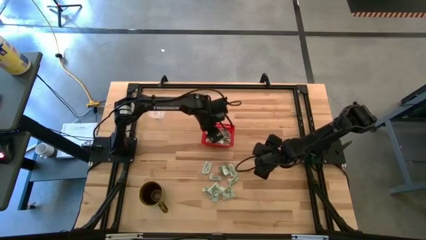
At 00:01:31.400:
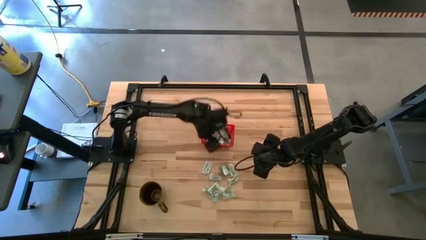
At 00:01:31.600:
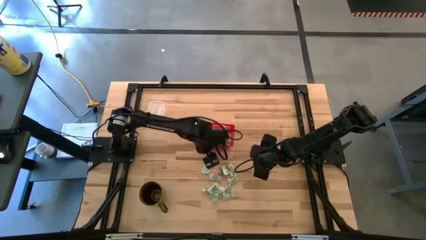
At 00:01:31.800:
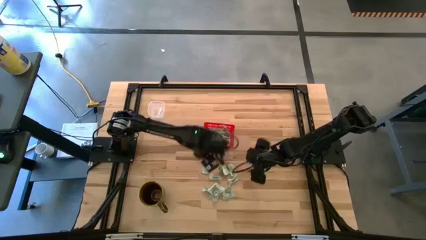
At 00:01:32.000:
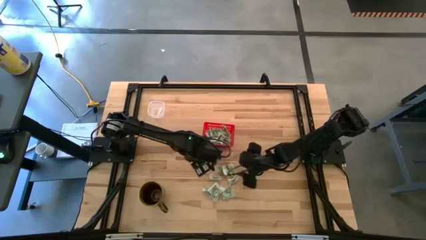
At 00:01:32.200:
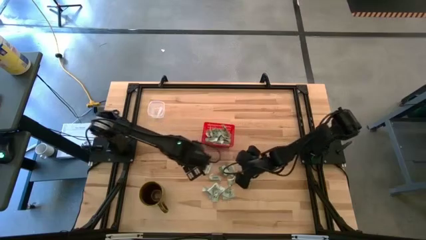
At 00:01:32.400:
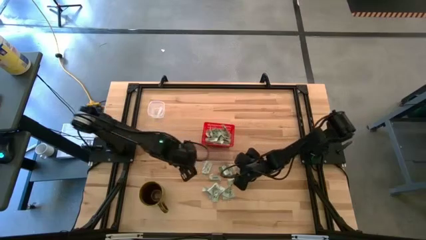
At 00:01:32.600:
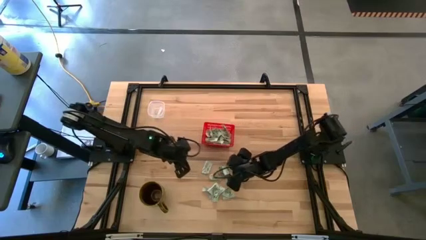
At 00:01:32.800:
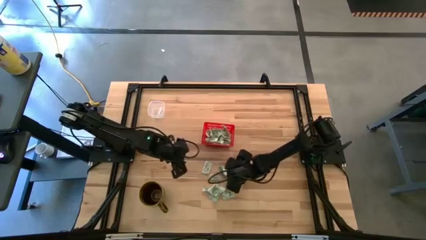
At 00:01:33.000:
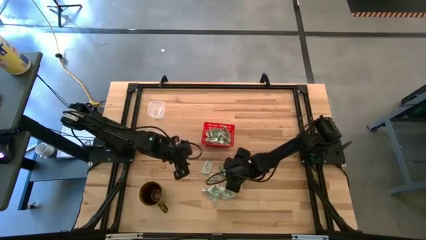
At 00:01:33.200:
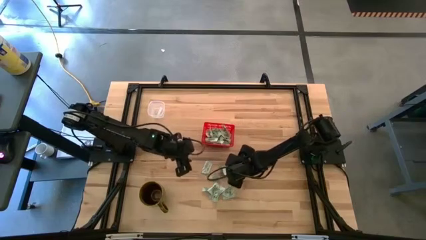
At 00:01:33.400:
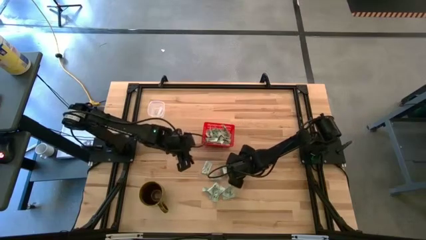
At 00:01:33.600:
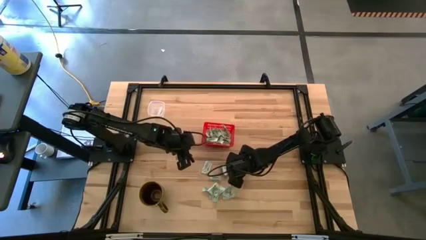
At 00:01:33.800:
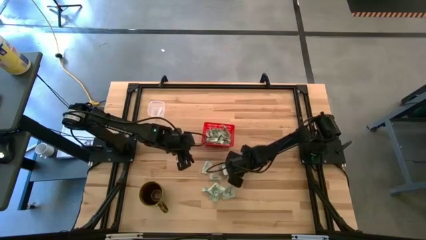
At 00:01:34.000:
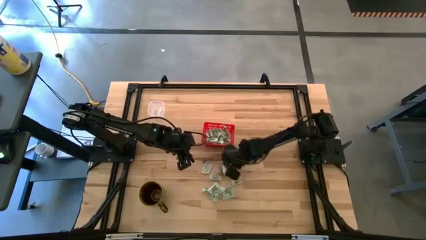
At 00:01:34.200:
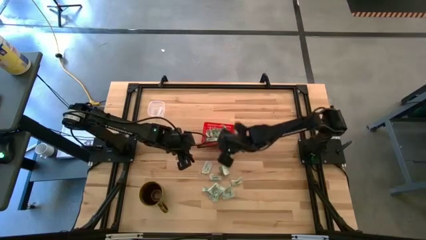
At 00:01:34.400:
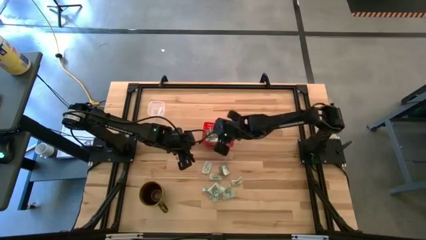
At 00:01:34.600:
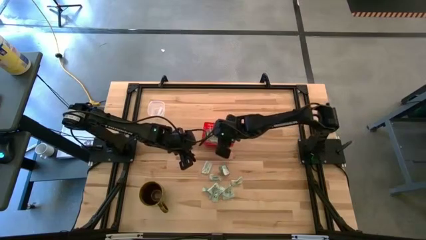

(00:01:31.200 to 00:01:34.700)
Task: Pick and place items into bin
Put the green stevia packet into the red bin

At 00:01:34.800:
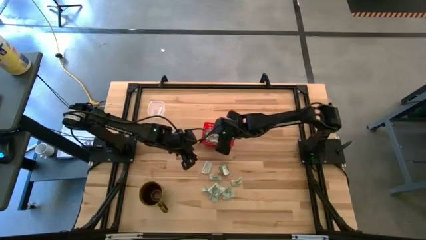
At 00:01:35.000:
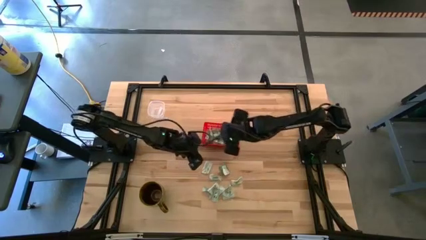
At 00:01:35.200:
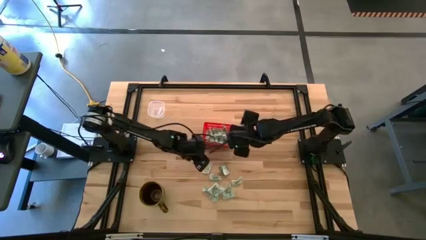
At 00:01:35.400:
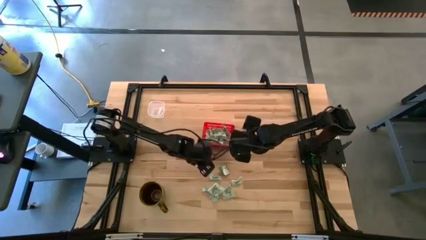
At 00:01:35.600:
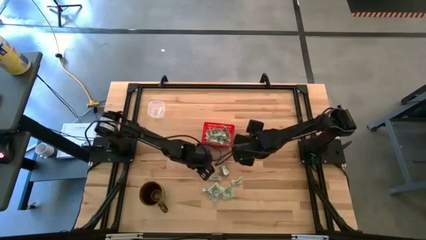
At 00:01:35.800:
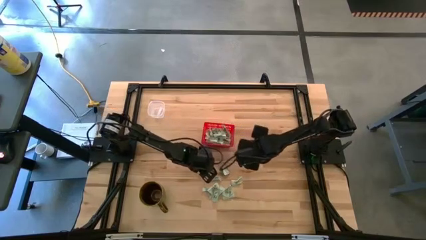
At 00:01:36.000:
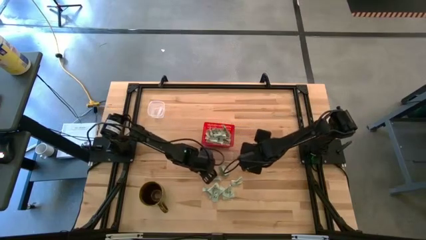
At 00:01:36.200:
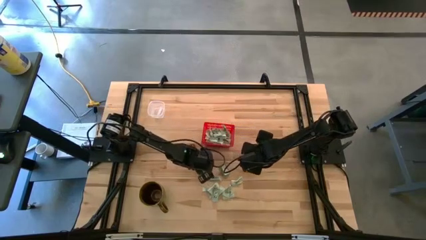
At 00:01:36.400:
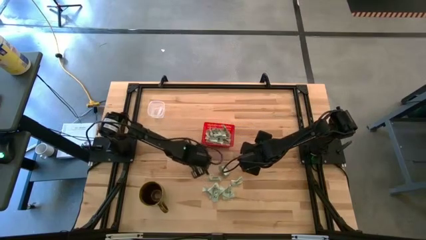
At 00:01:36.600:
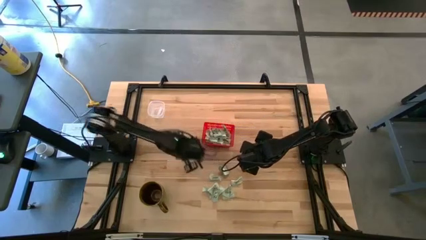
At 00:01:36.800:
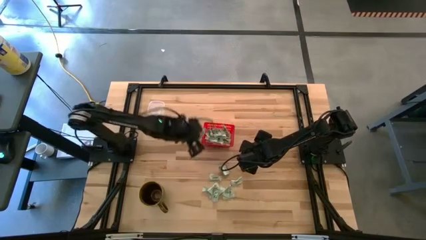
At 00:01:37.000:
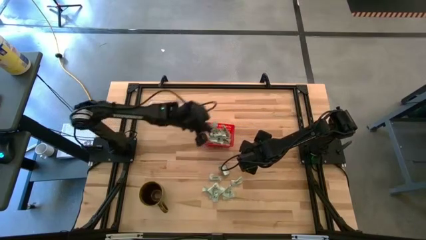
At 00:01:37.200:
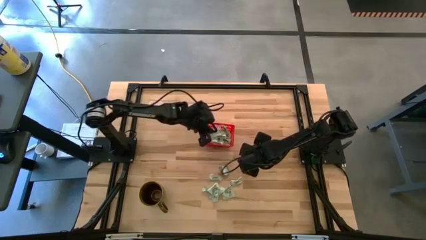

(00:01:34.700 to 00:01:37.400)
Put the green stevia packet into the red bin

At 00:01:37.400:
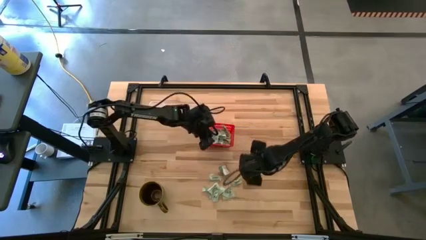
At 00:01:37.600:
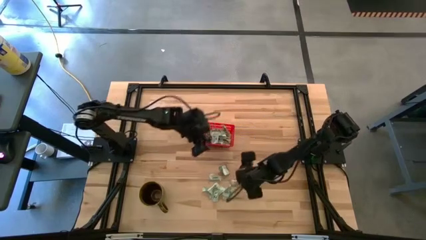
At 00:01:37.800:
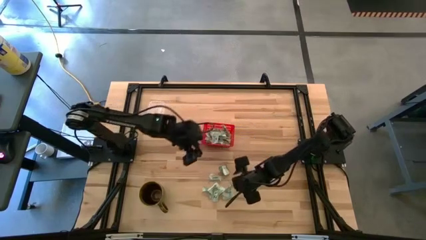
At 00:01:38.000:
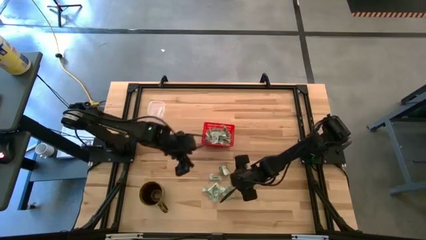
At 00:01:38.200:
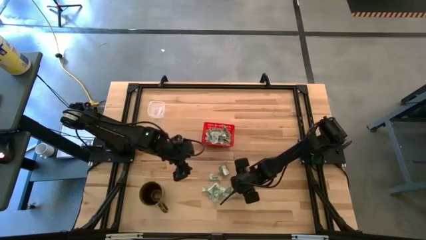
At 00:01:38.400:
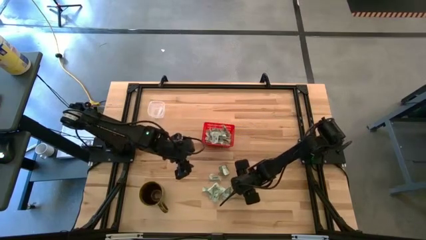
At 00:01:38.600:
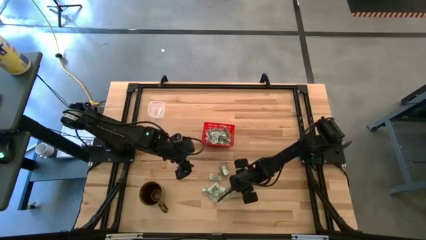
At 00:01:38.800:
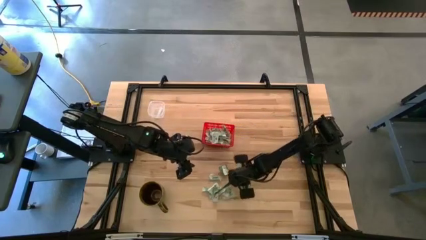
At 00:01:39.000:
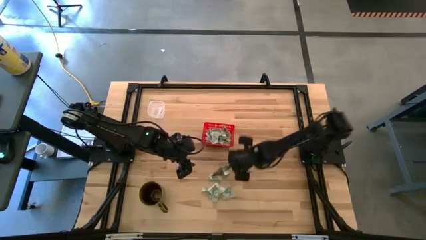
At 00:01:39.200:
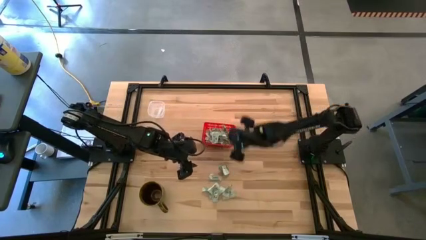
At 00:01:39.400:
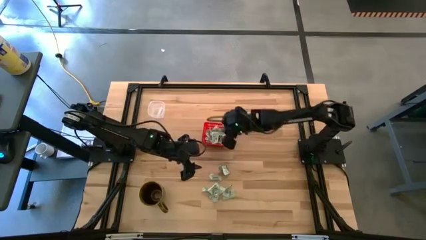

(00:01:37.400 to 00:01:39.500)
Put the green stevia packet into the red bin

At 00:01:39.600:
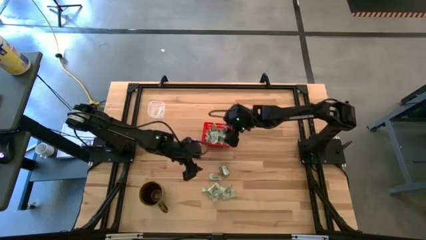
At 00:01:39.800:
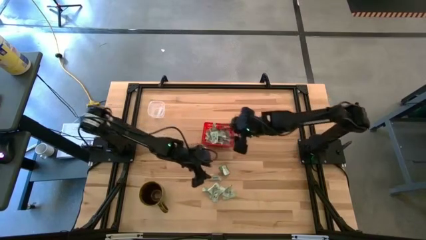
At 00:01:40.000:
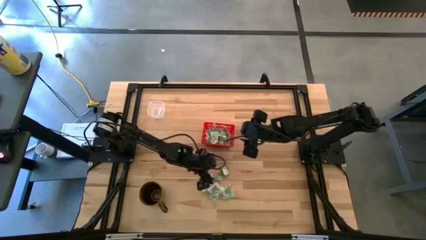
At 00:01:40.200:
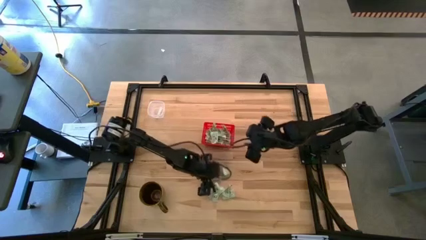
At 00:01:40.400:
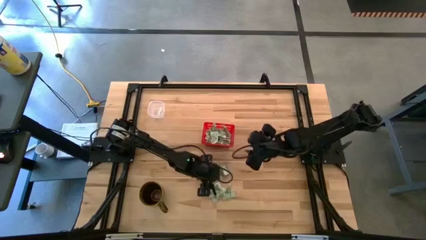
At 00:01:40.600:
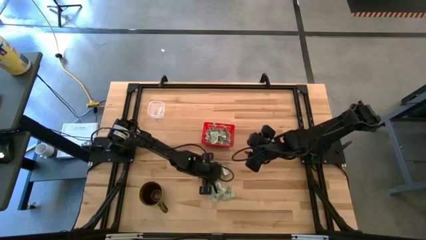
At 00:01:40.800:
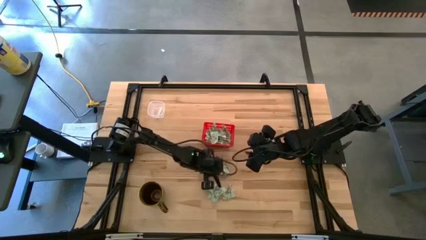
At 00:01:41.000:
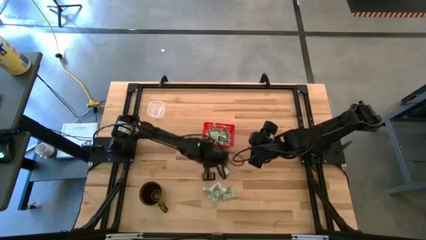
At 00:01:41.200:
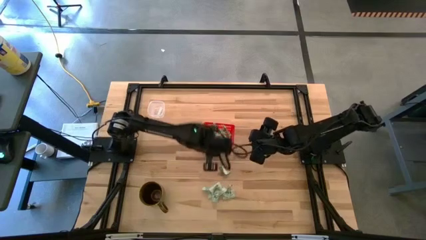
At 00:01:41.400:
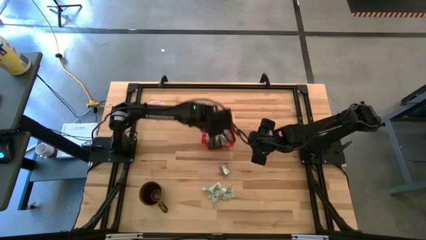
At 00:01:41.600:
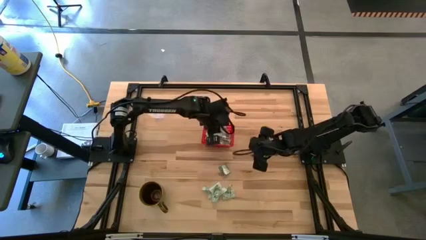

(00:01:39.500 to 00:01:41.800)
Put the green stevia packet into the red bin

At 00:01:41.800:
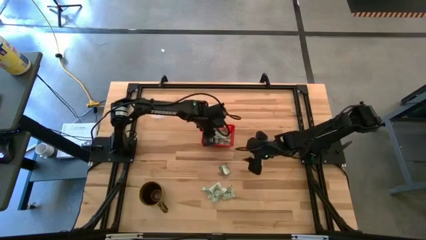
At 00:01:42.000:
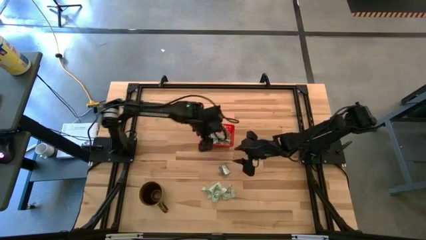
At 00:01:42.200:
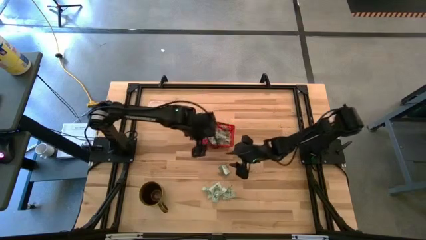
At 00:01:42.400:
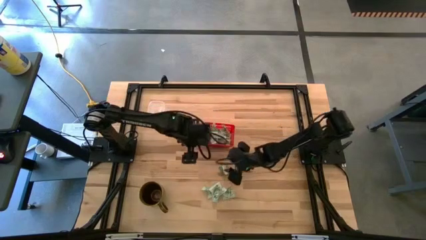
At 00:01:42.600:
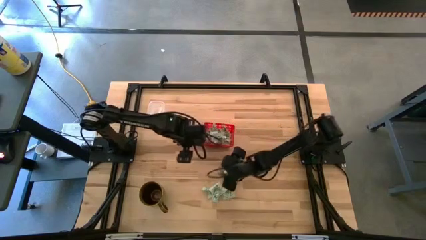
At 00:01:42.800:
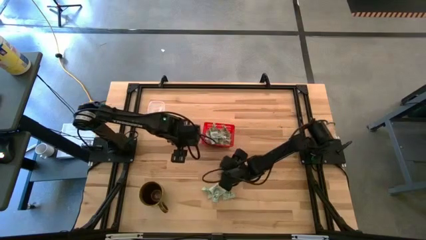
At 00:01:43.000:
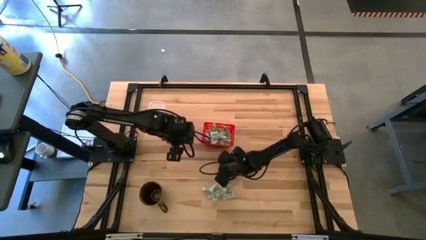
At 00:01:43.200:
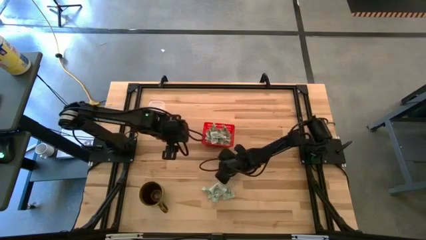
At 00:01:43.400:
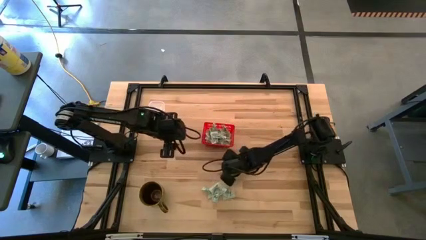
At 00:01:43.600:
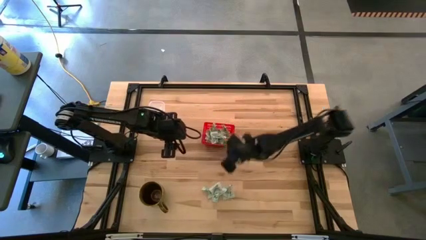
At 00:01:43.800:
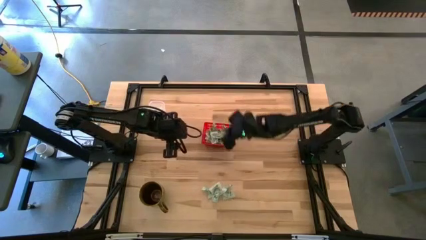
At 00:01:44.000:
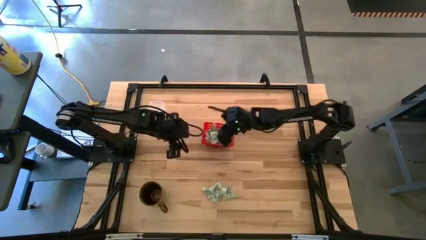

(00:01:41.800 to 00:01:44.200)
Put the white truvia packet into the red bin

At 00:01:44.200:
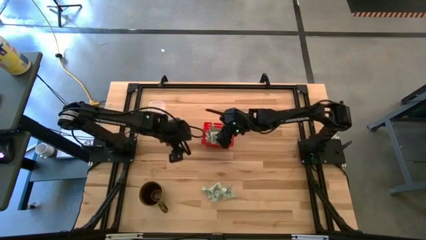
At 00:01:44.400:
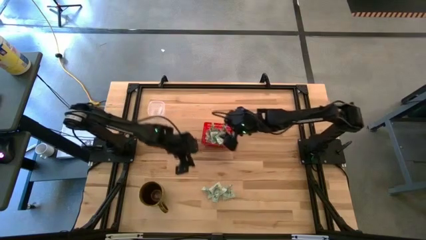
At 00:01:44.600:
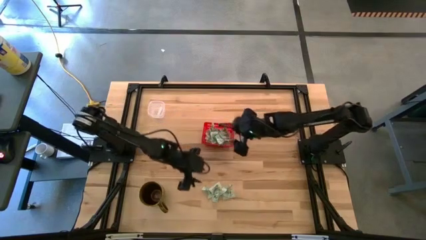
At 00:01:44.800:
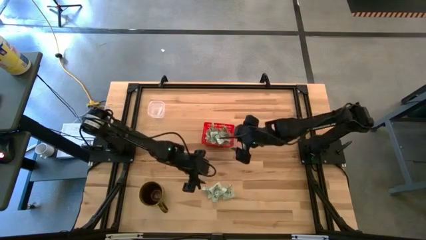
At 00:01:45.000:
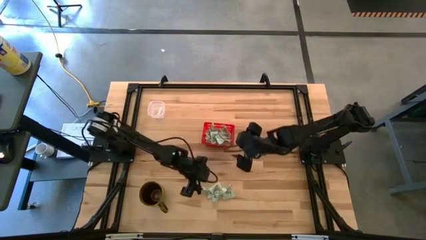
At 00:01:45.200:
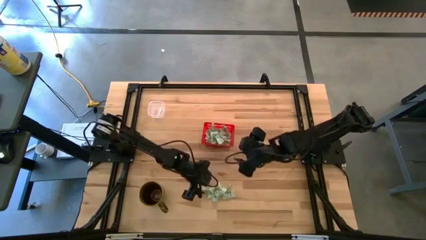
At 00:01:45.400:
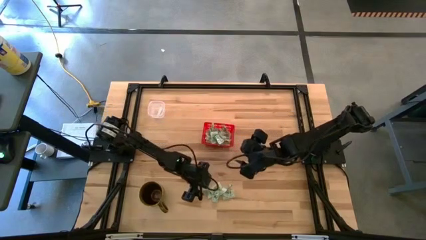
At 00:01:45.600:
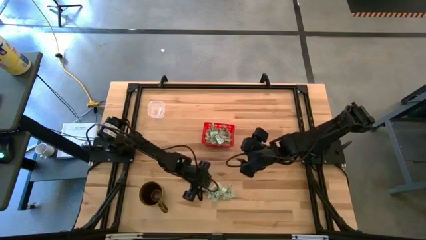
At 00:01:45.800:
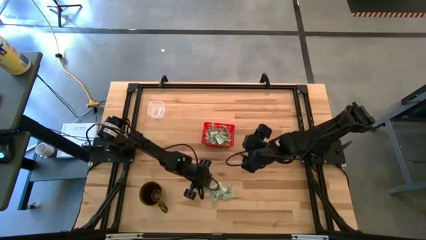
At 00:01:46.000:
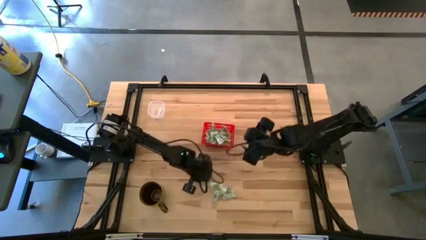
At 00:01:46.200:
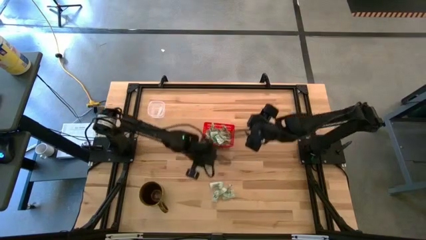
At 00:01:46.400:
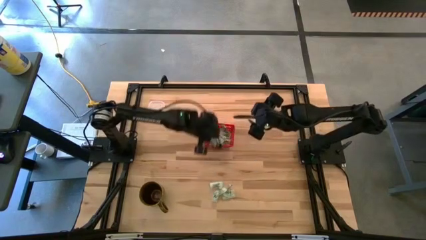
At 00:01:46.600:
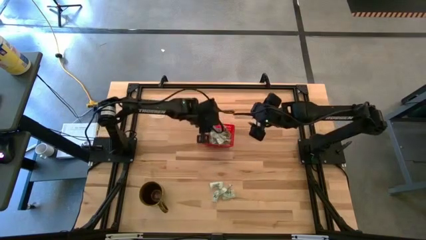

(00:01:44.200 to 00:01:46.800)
Put the green stevia packet into the red bin

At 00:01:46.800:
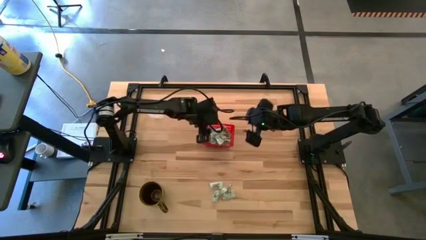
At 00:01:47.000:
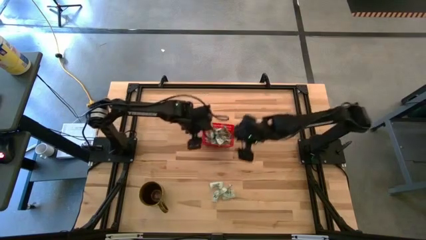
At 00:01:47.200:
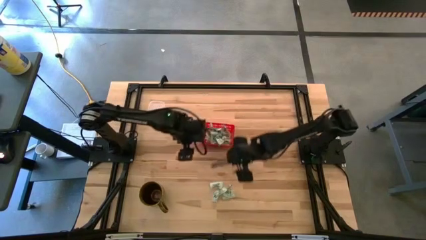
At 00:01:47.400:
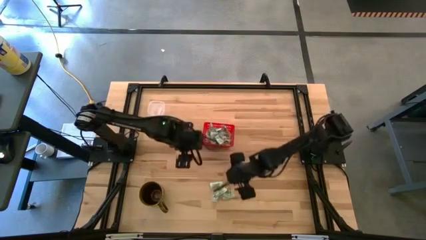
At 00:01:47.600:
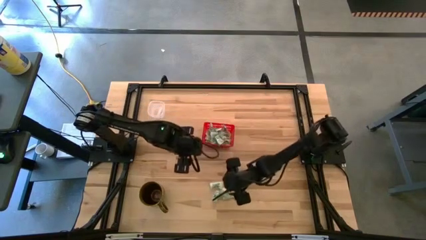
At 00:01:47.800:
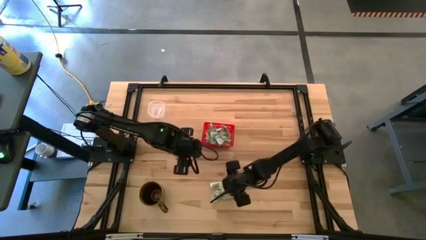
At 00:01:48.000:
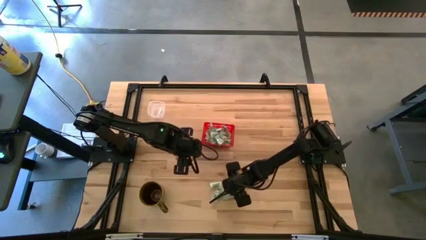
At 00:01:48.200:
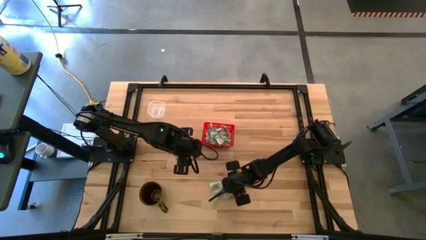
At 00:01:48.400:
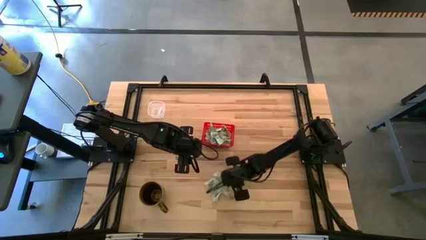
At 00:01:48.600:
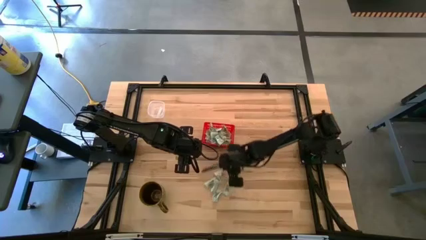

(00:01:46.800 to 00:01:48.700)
Put the green stevia packet into the red bin
